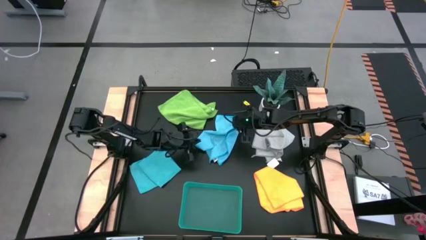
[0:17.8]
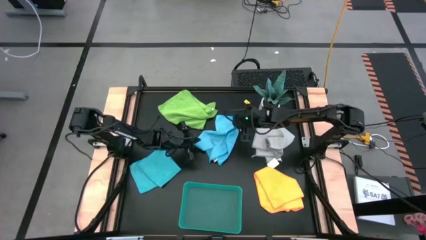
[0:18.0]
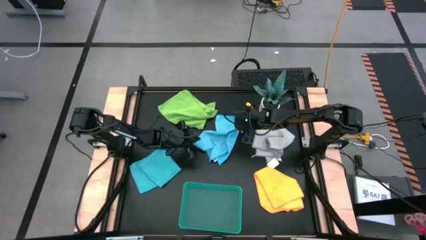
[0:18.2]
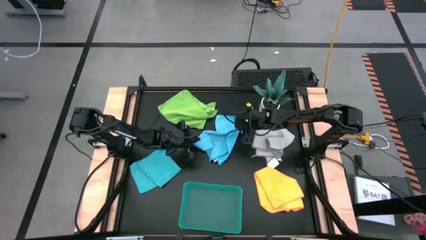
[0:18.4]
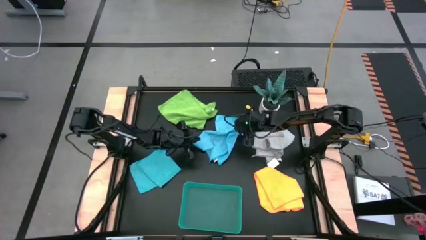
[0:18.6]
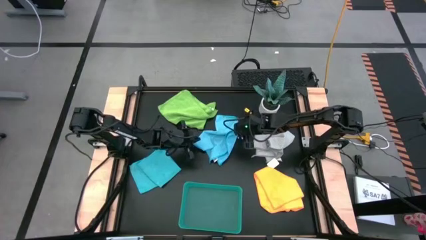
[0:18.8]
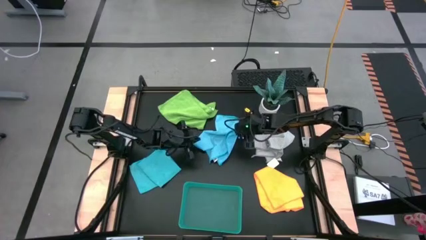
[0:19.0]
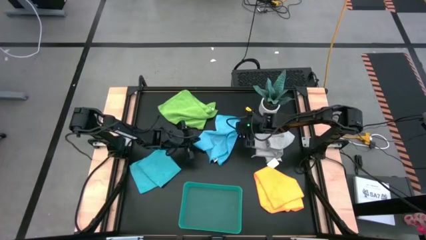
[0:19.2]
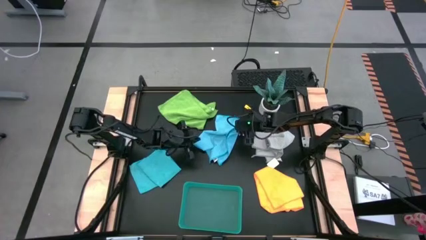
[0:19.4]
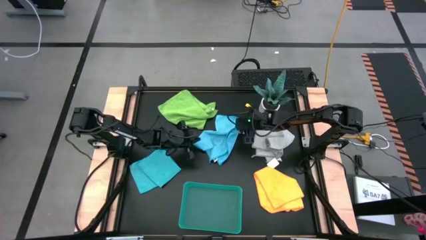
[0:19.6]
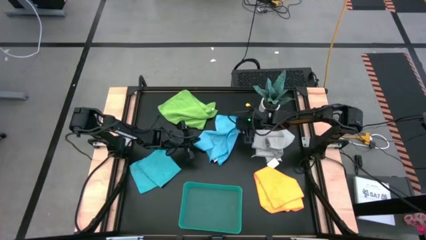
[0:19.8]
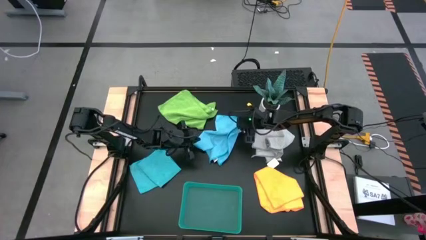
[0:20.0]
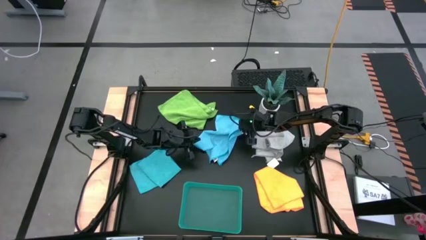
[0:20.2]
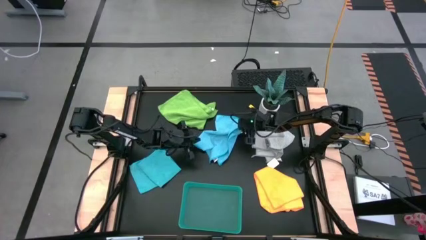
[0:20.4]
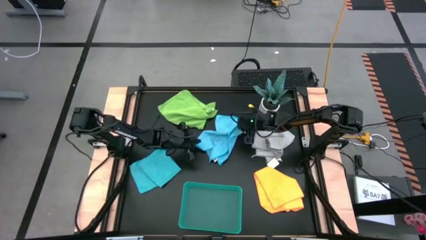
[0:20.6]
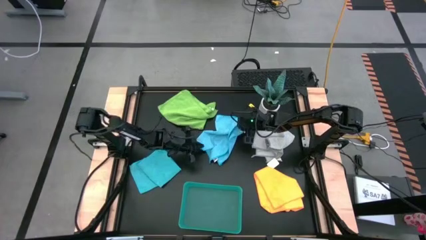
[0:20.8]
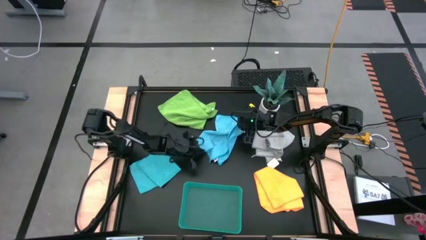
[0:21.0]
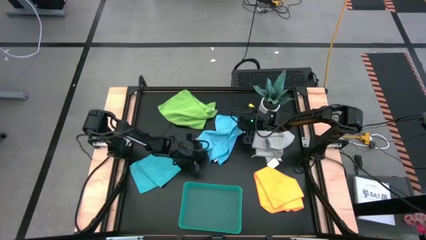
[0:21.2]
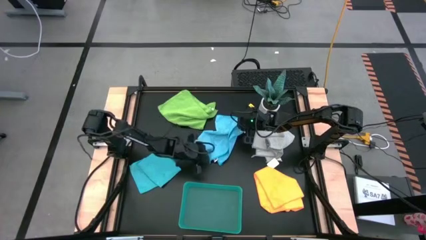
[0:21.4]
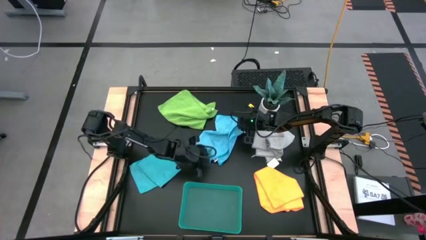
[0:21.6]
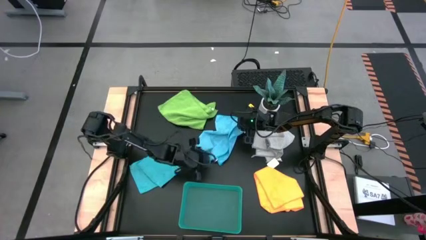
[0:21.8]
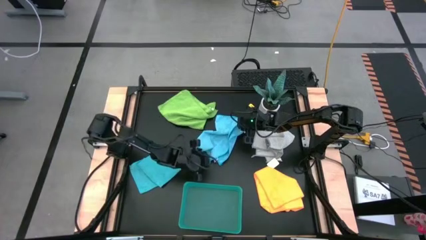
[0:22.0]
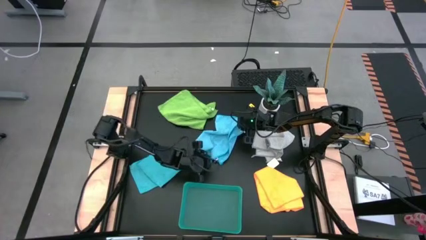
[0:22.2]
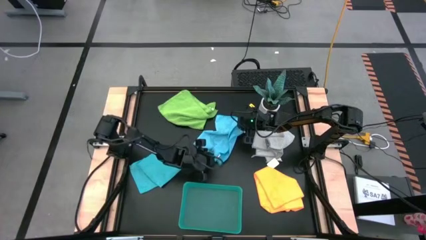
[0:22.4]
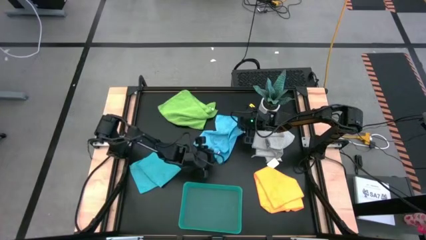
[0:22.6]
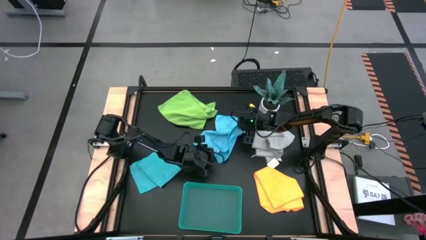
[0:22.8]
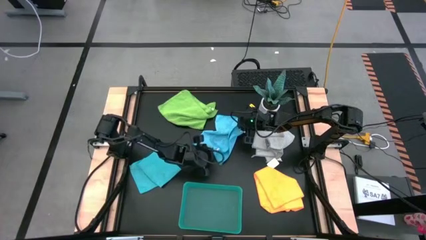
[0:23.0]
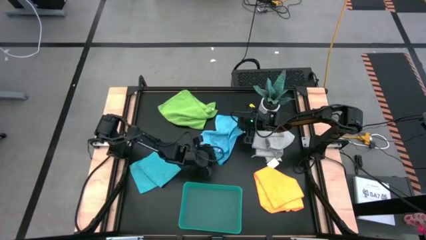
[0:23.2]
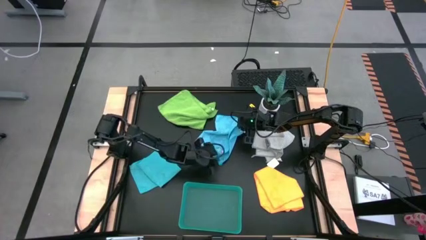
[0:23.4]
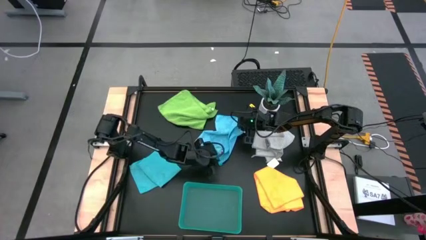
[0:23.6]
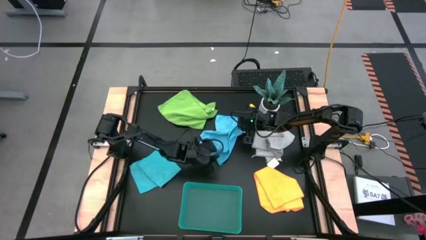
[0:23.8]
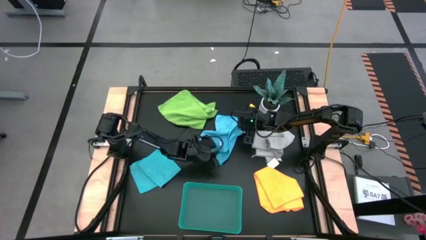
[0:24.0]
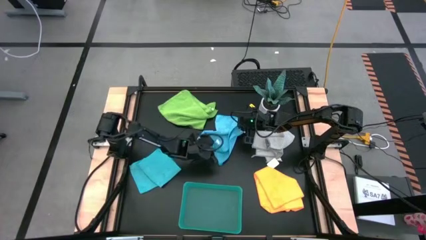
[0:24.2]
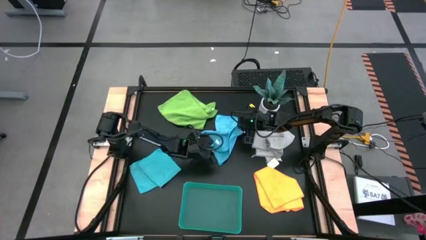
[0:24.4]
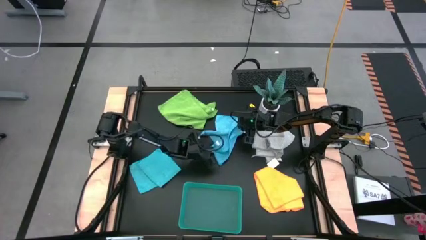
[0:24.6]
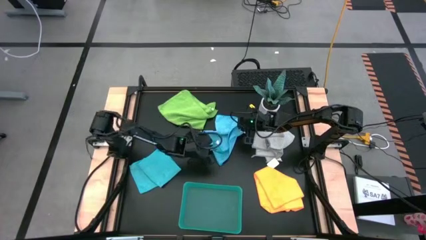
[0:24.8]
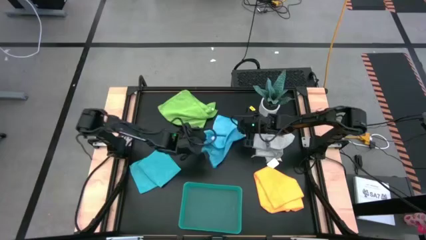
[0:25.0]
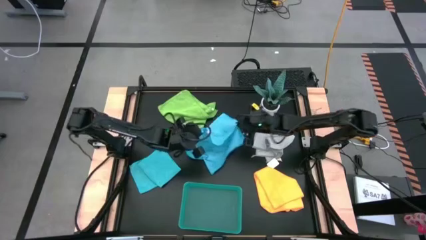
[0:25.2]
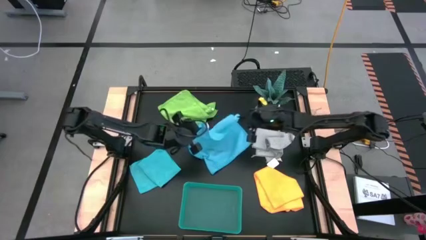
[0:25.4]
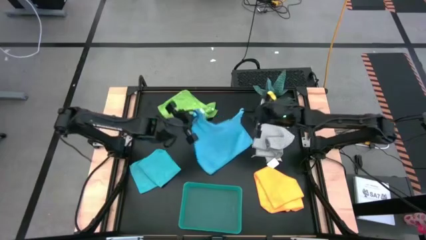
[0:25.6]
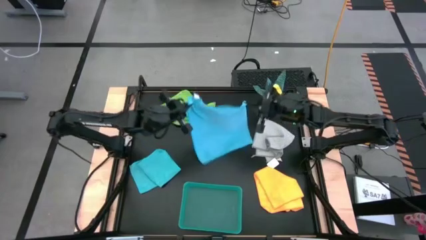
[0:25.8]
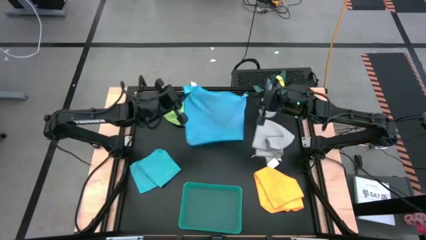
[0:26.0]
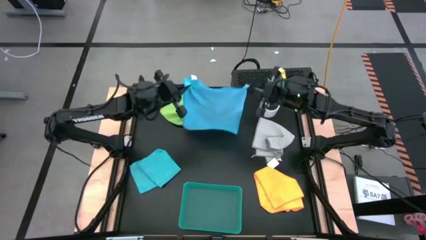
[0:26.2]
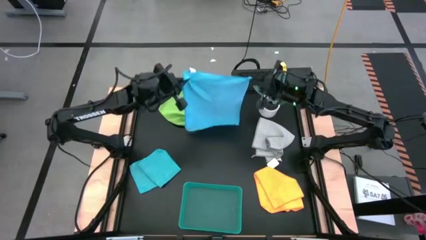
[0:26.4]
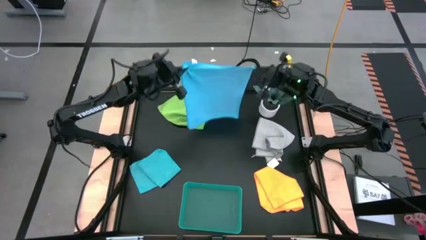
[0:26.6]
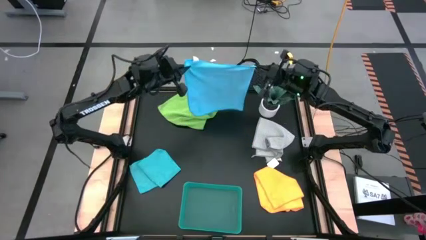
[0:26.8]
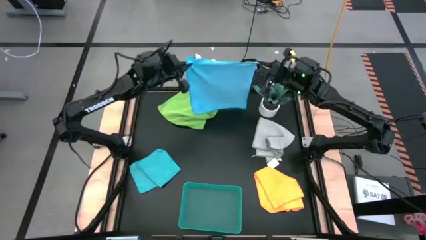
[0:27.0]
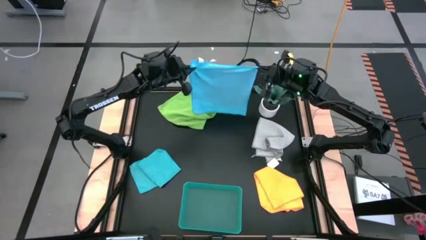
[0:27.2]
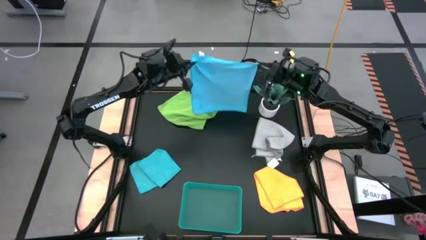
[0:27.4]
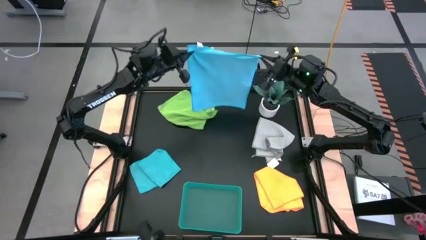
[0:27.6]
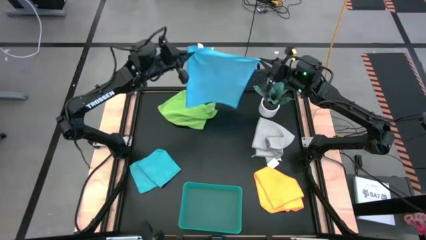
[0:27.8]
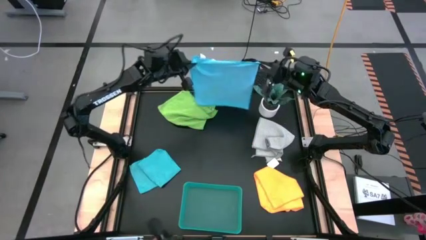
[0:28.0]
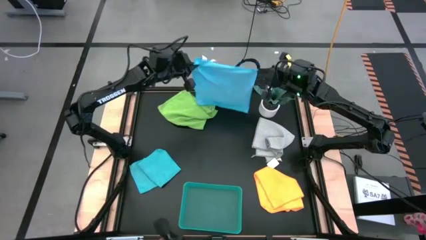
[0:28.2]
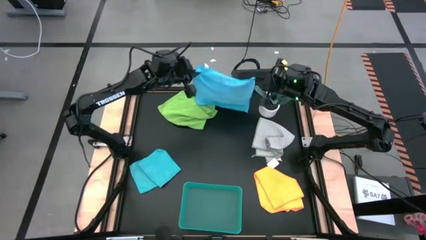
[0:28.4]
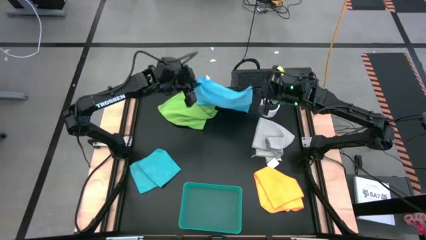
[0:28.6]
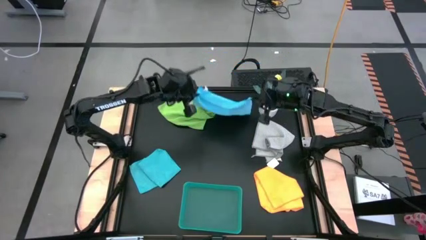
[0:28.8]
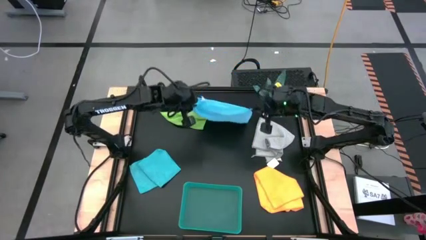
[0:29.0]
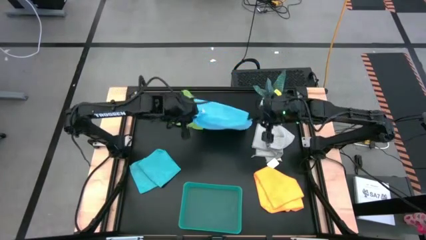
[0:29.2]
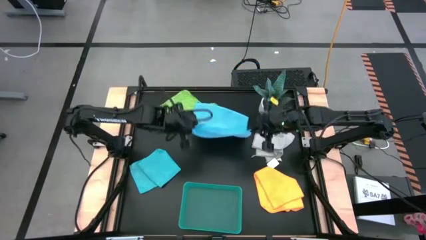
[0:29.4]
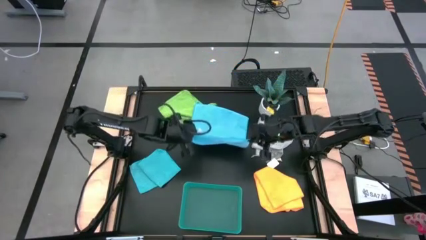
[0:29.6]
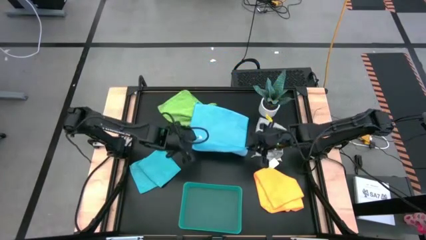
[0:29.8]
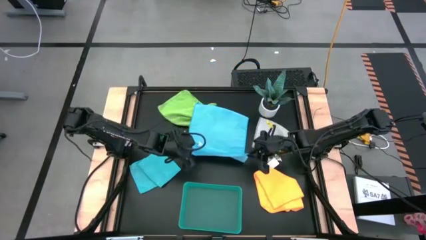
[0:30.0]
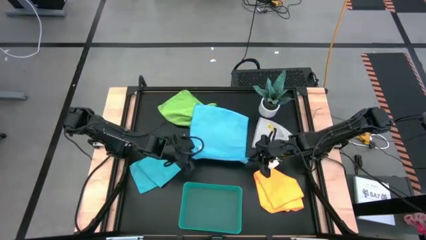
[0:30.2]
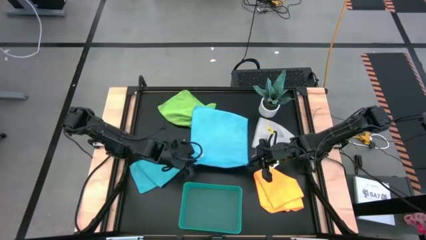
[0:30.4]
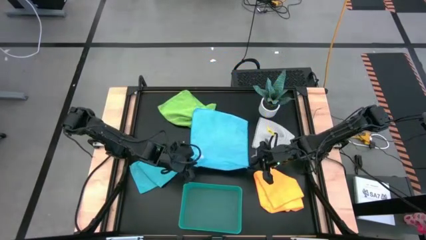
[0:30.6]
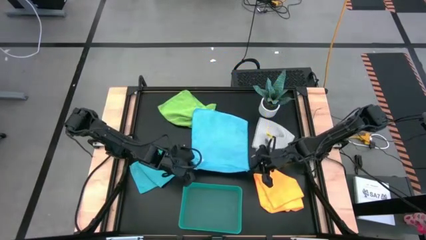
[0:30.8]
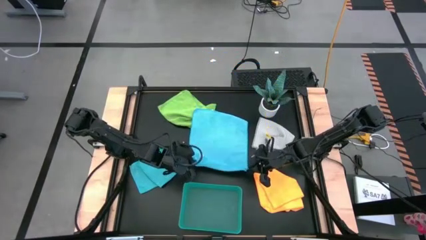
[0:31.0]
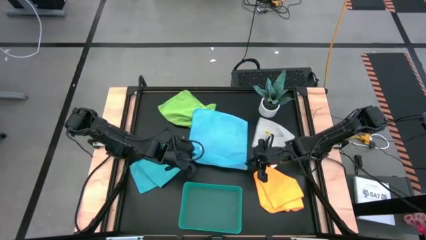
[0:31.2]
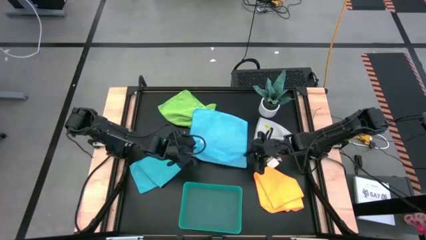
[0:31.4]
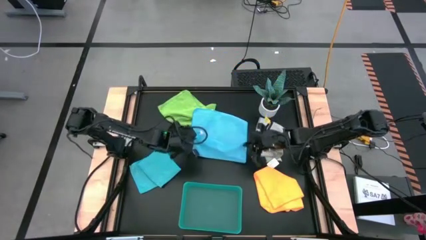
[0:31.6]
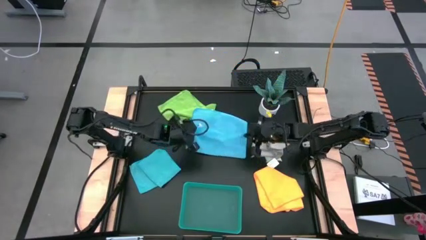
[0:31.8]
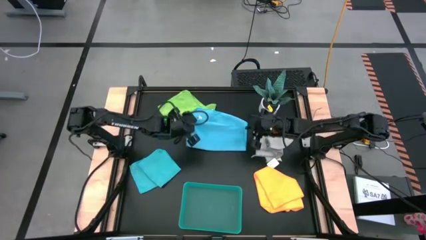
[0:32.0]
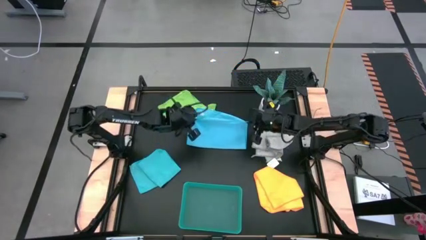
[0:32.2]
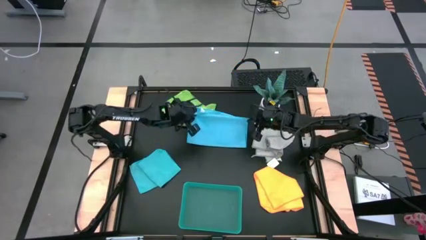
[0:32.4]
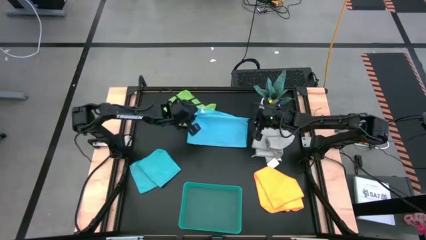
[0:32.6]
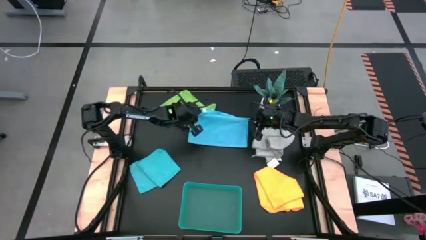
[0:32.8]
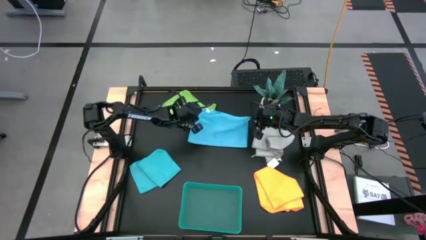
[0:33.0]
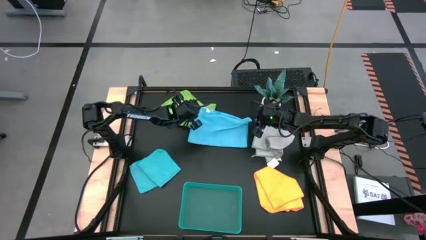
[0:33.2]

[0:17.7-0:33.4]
Task: Fold microfiber towels
Fold the right blue microfiber cloth
